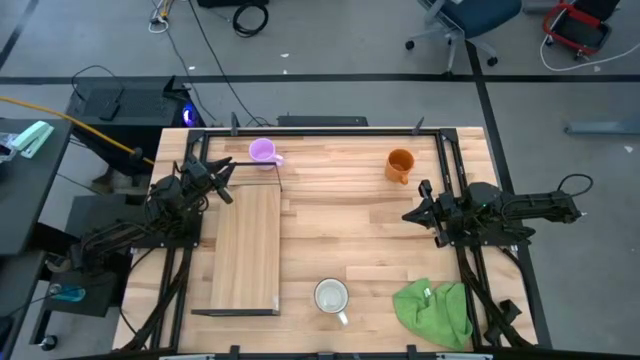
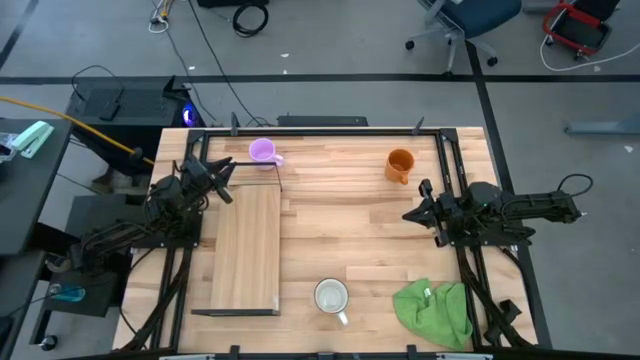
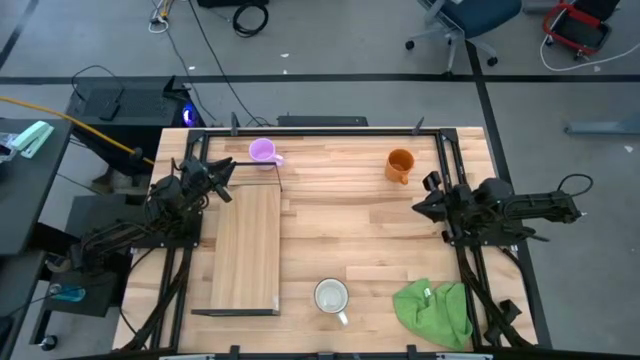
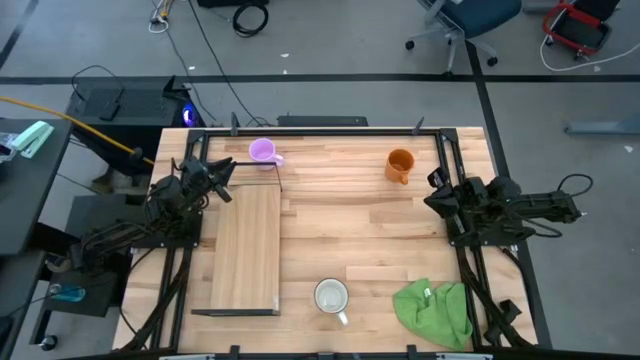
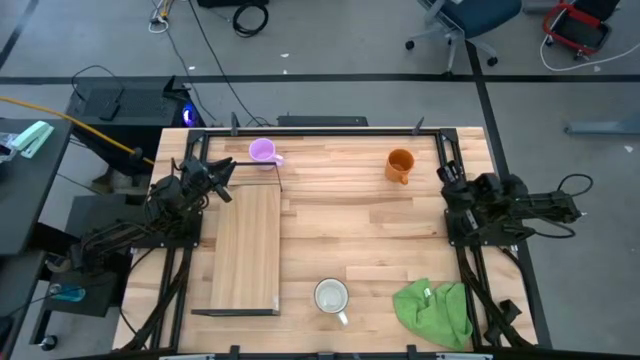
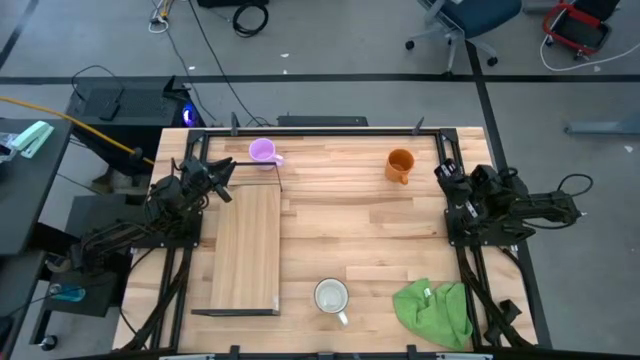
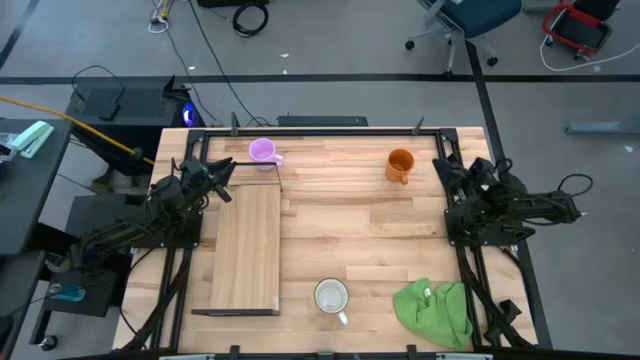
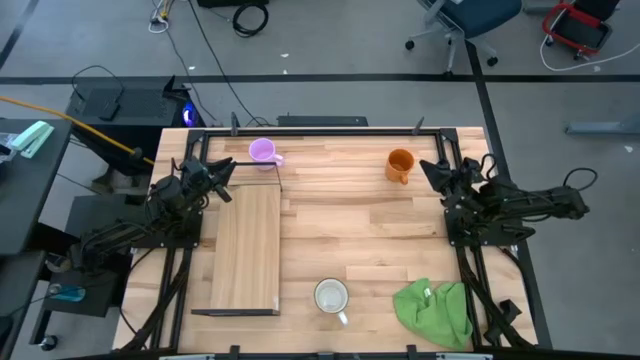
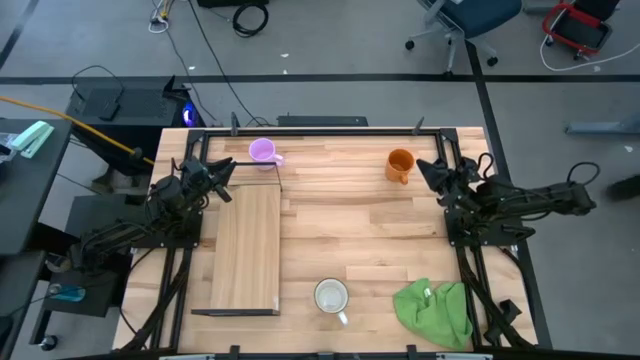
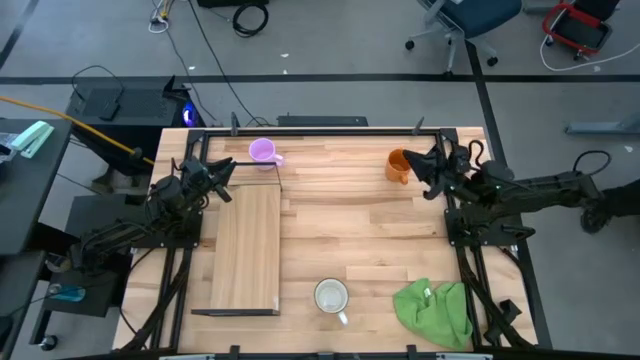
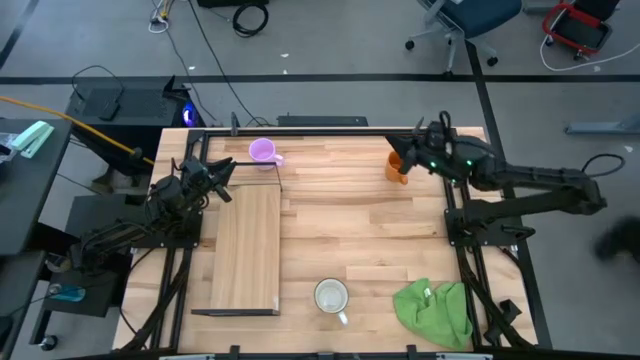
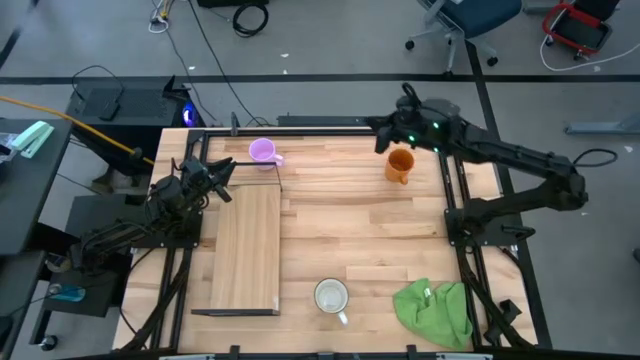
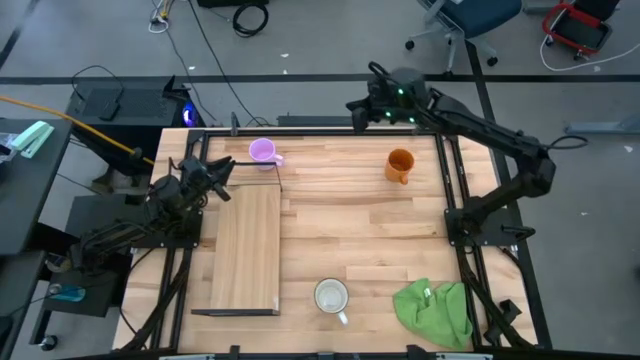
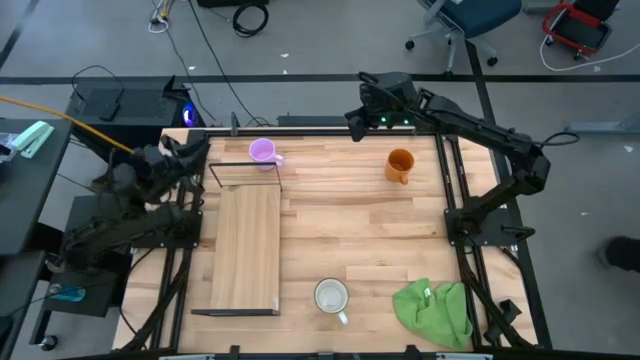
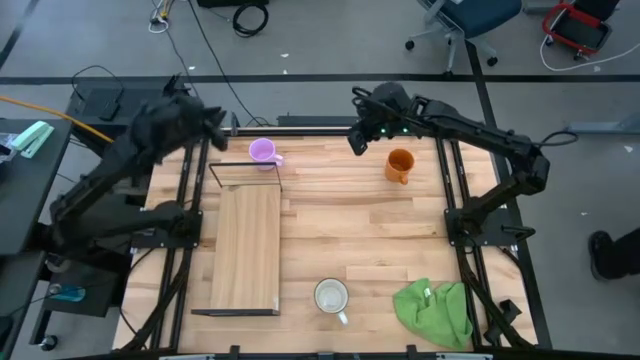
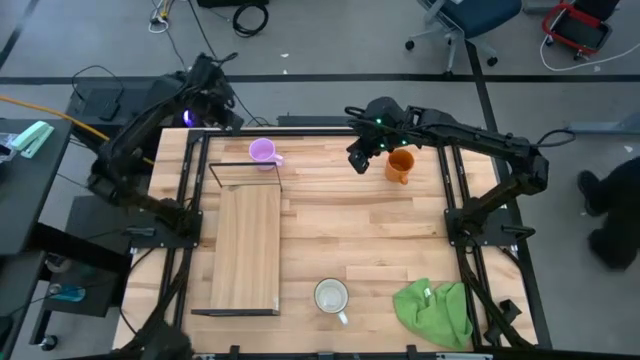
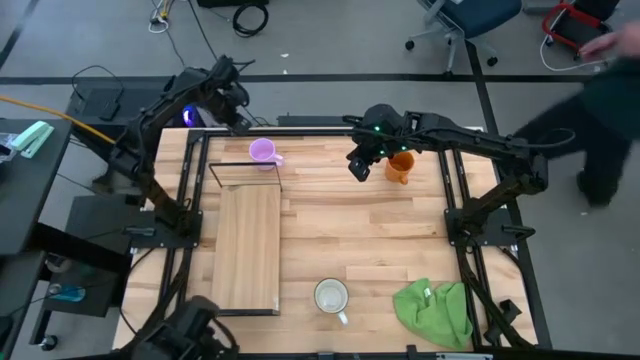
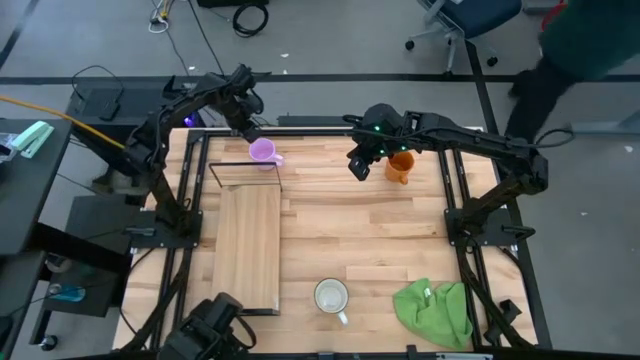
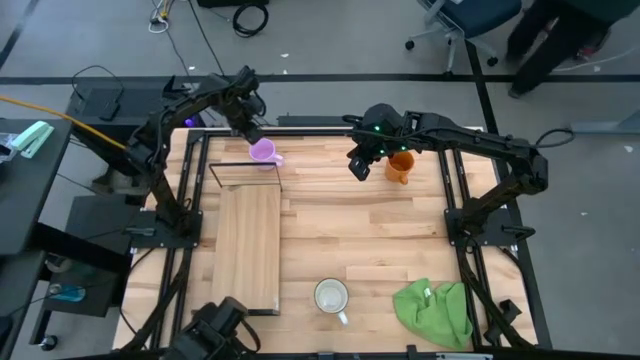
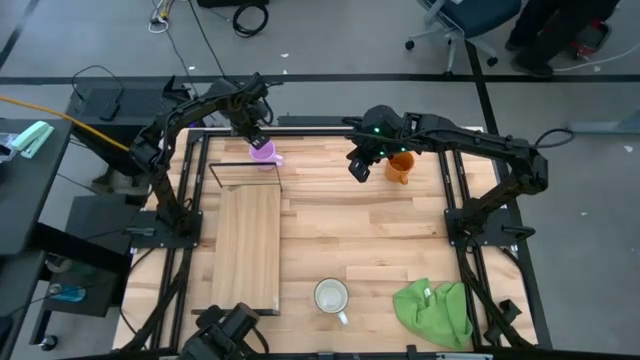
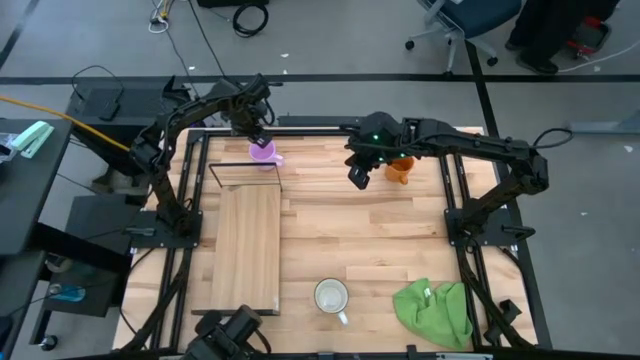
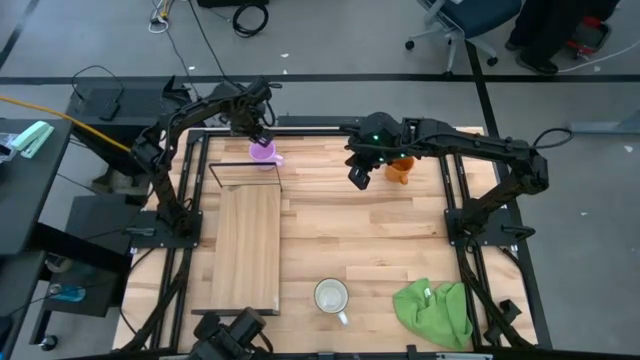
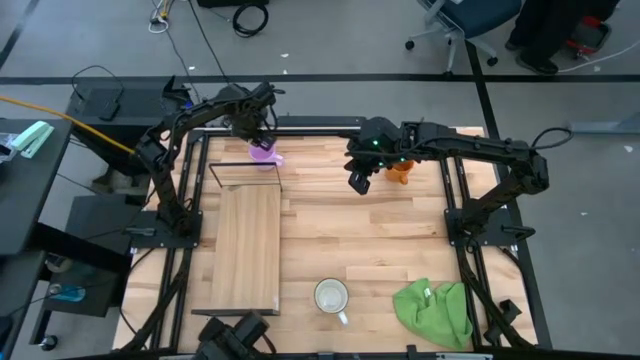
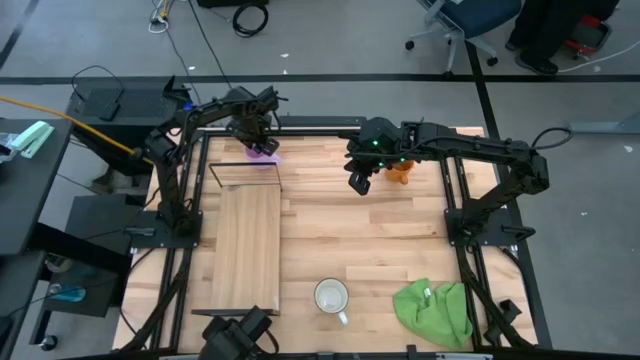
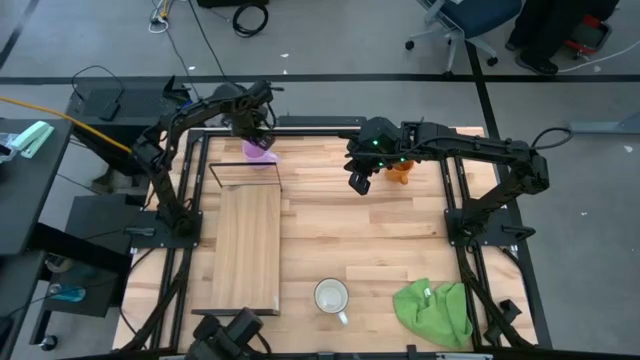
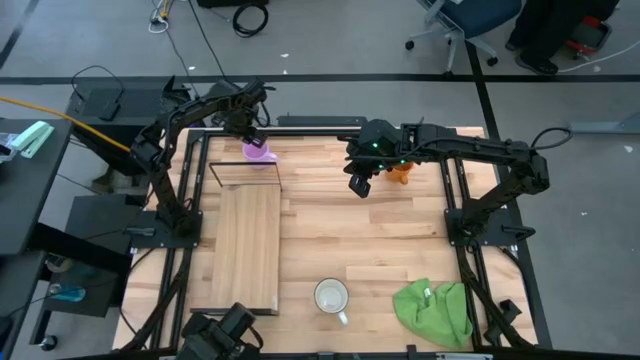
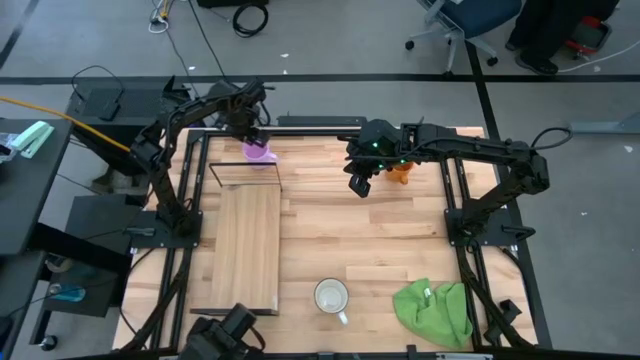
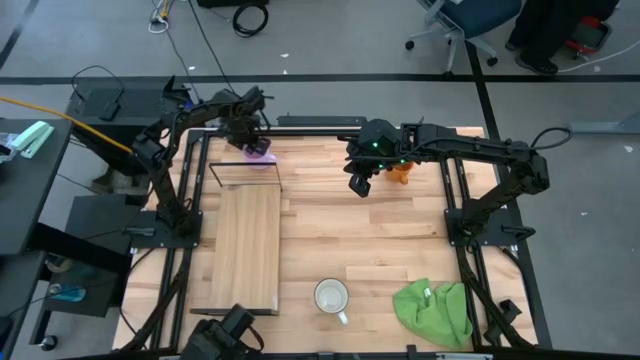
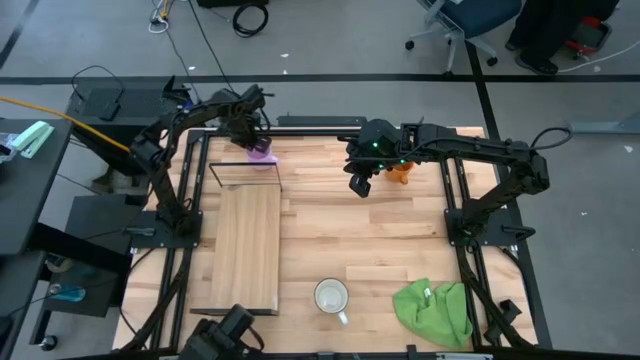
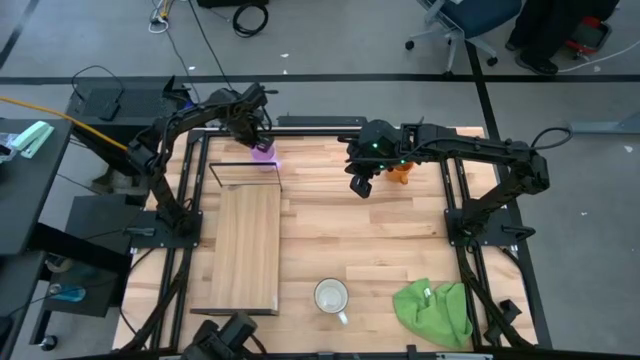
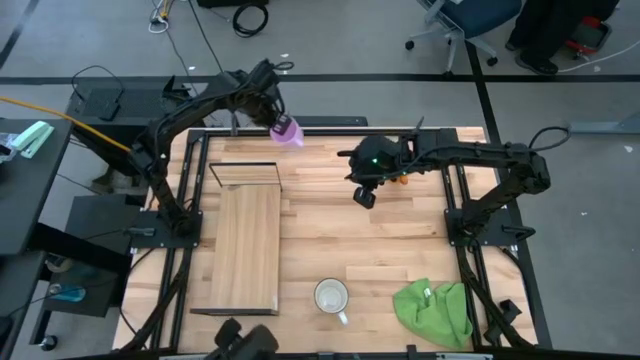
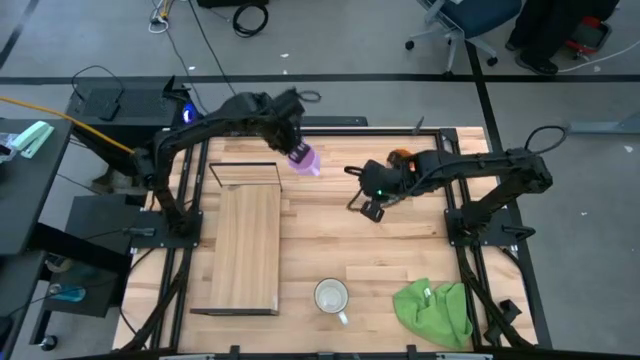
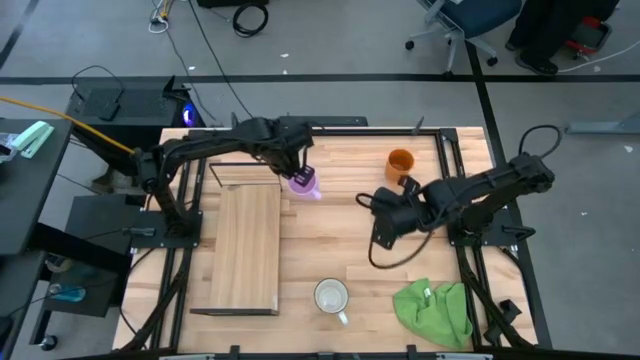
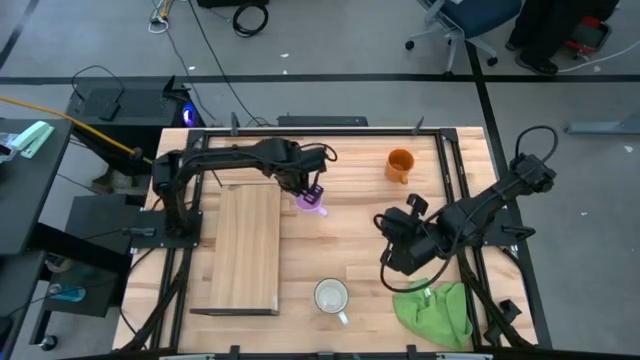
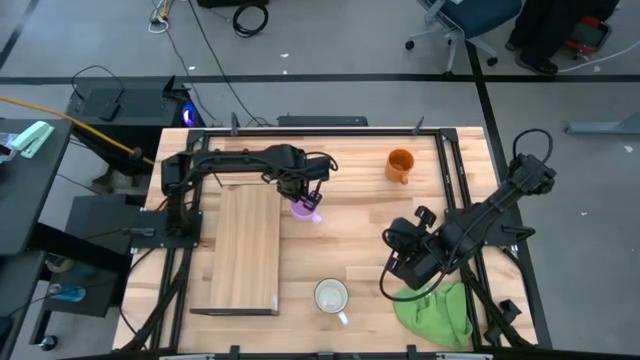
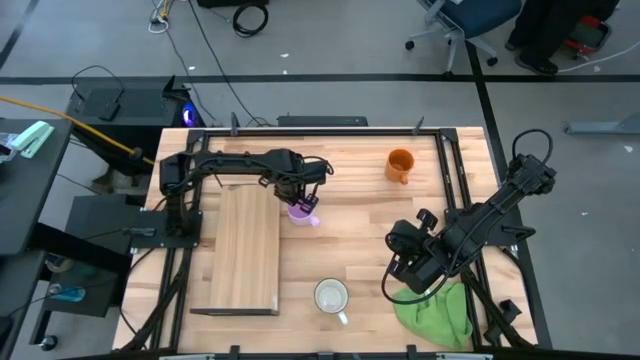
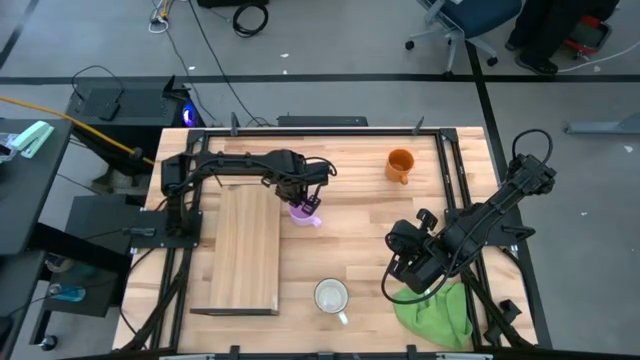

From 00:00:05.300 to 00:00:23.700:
Task: Stack small to large cups/mugs on shelf
Move the pink mug to the right side of the shelf

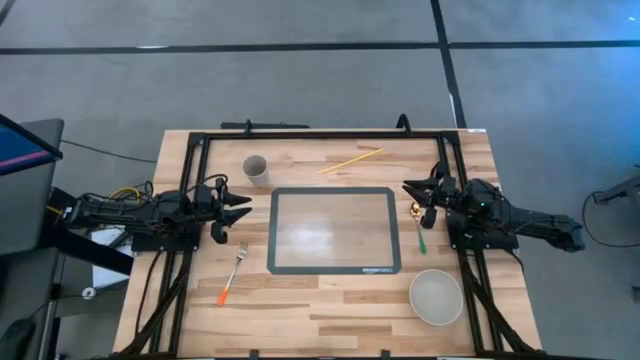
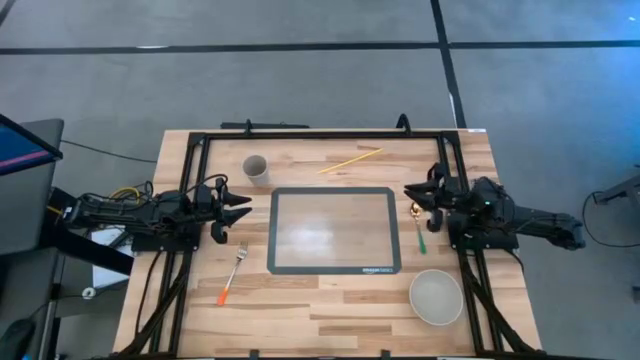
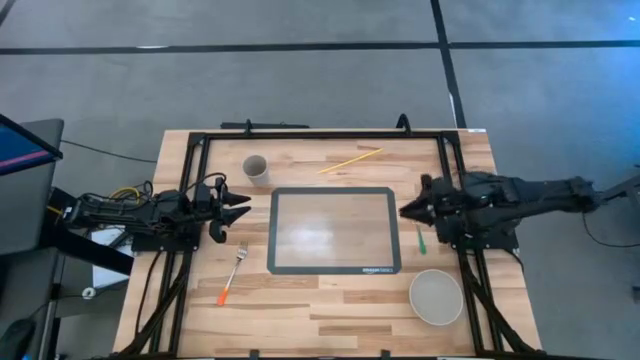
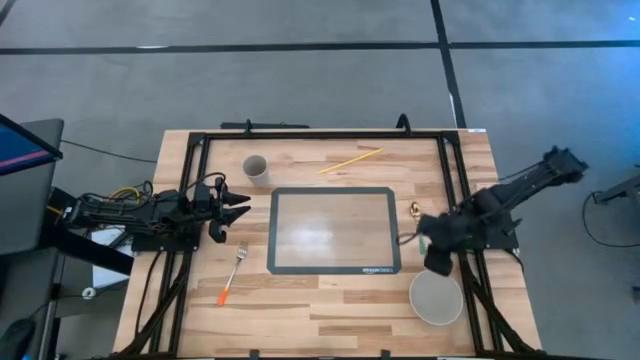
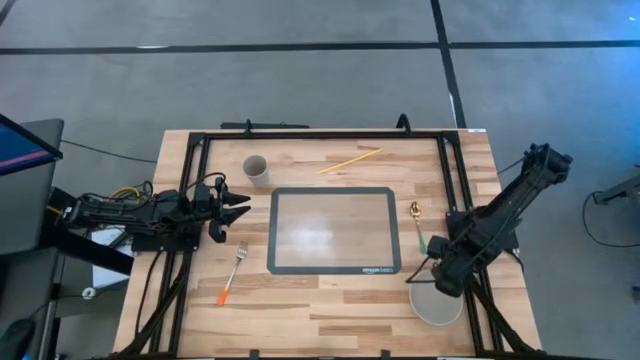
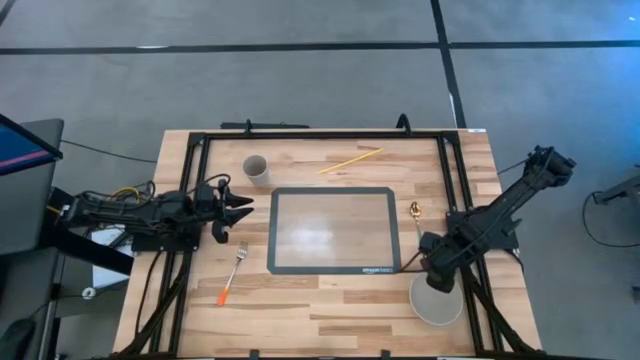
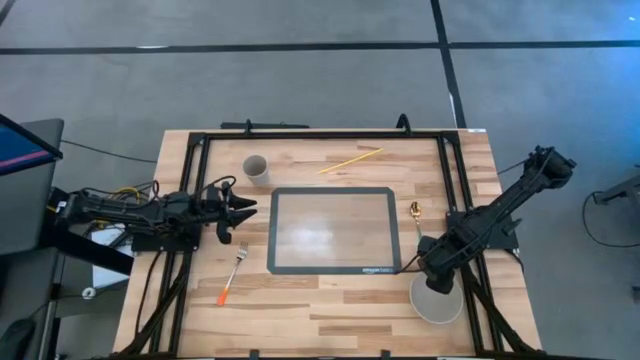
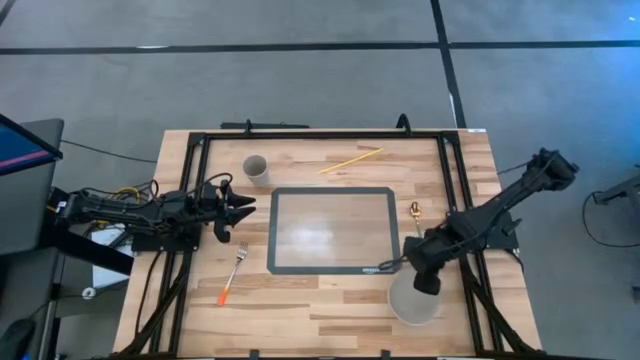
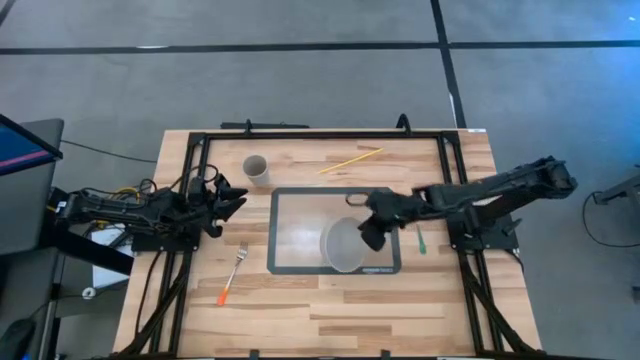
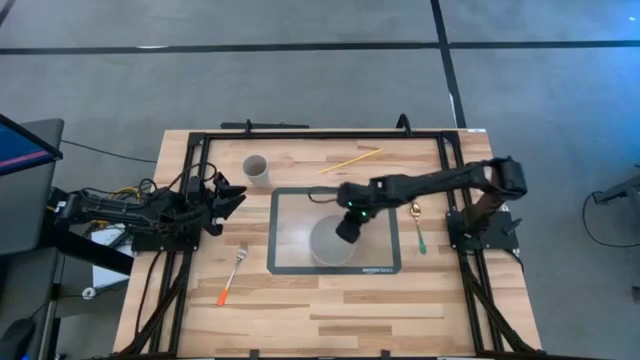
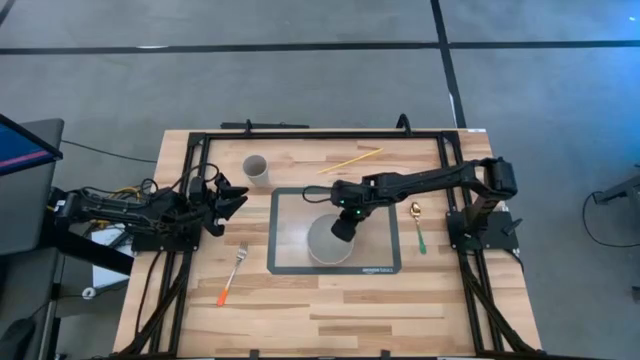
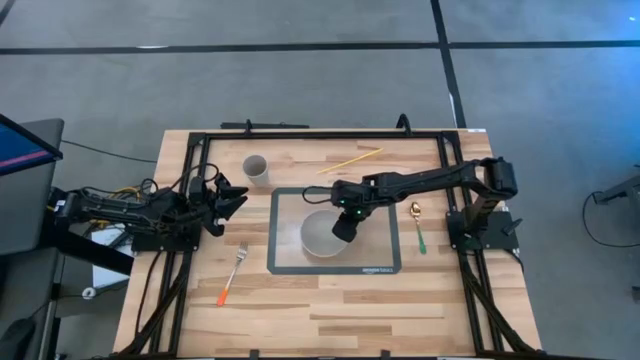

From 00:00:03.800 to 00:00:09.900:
Task: Pick & Place Utensil
Put the white bowl on the transparent placemat
